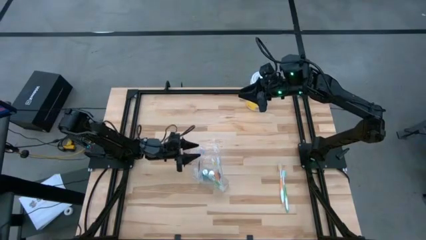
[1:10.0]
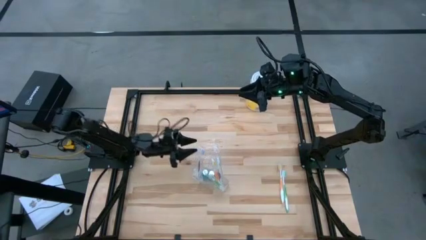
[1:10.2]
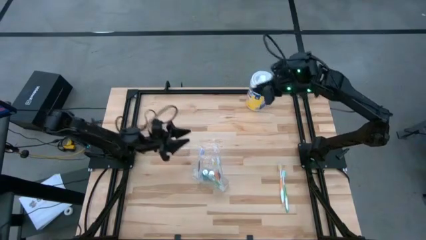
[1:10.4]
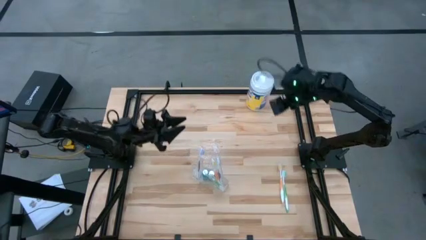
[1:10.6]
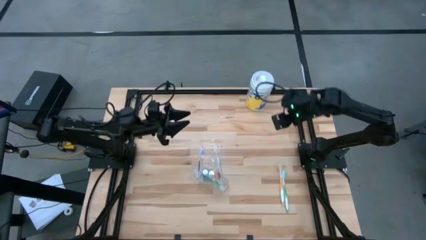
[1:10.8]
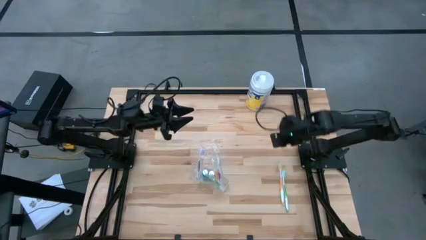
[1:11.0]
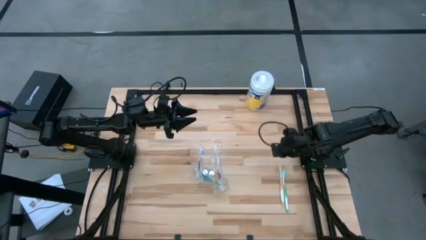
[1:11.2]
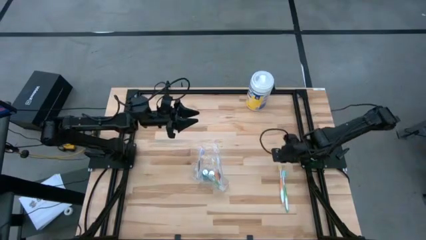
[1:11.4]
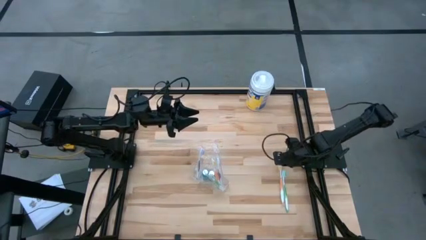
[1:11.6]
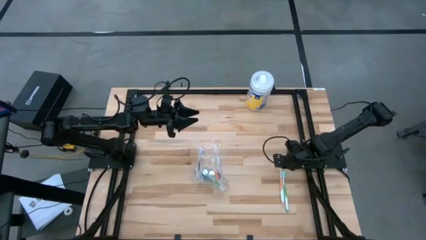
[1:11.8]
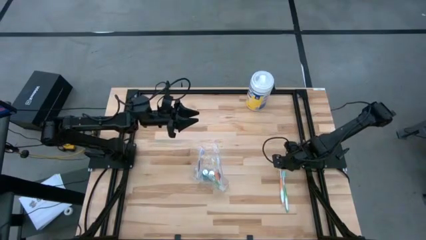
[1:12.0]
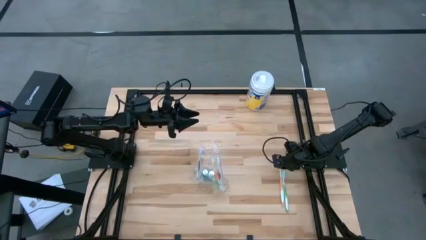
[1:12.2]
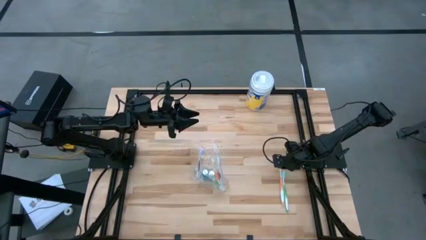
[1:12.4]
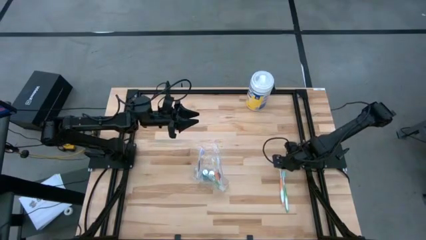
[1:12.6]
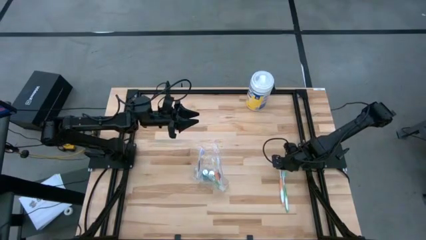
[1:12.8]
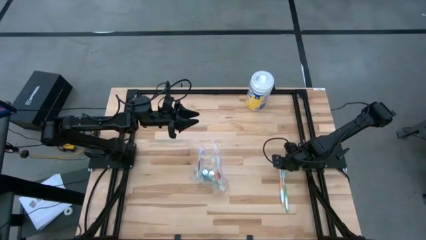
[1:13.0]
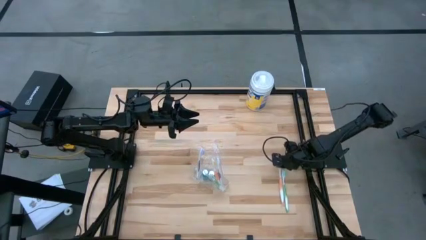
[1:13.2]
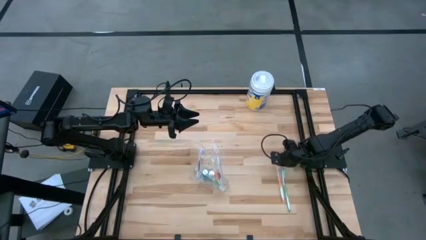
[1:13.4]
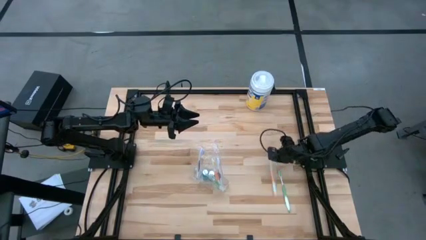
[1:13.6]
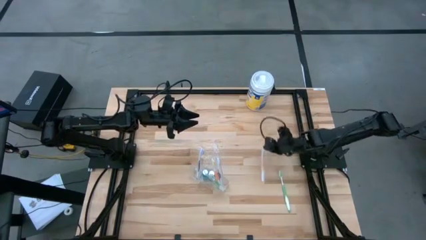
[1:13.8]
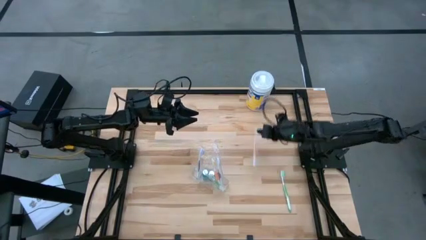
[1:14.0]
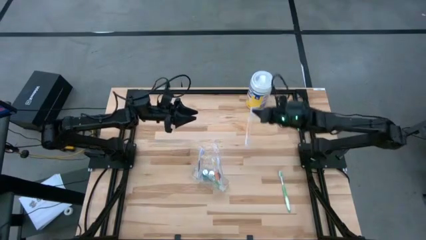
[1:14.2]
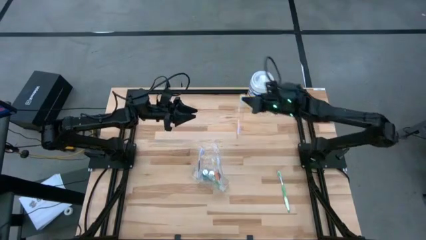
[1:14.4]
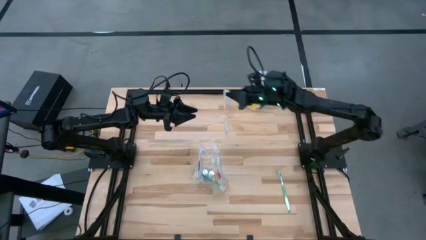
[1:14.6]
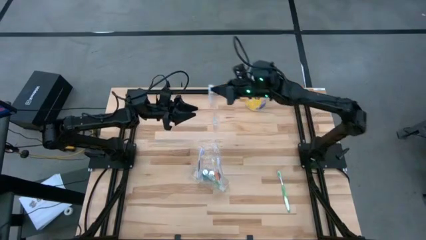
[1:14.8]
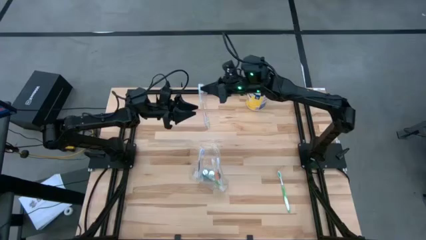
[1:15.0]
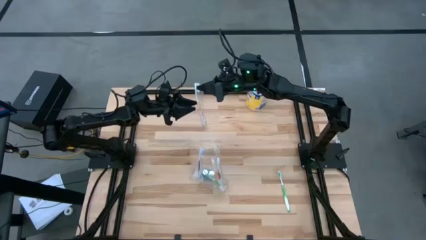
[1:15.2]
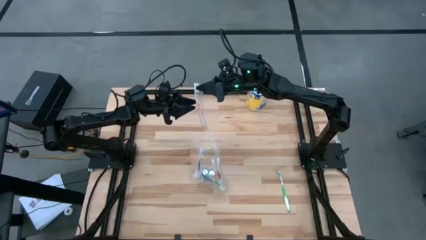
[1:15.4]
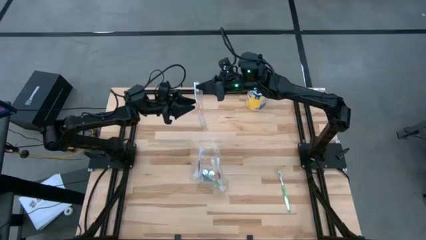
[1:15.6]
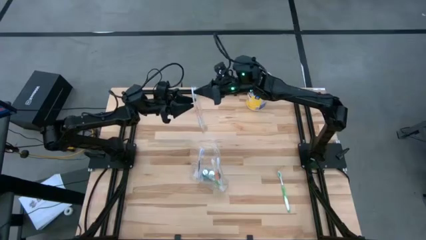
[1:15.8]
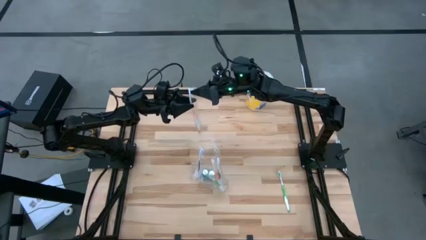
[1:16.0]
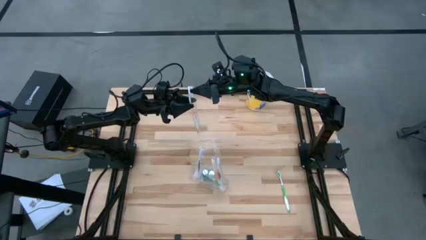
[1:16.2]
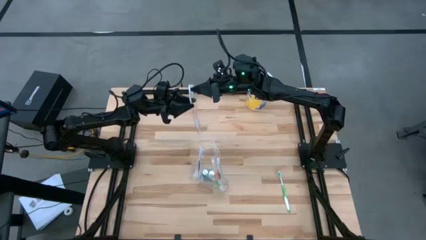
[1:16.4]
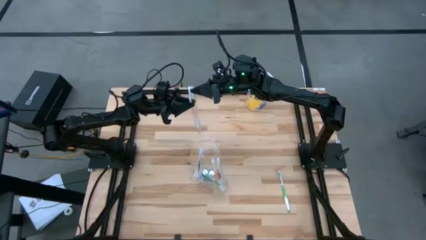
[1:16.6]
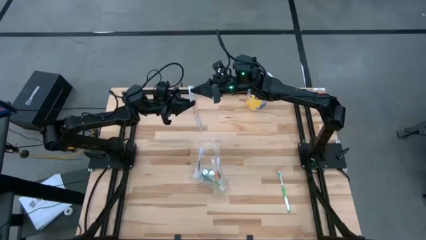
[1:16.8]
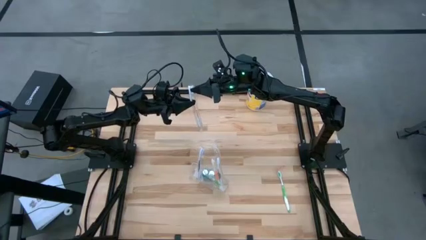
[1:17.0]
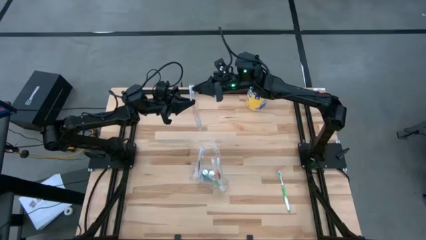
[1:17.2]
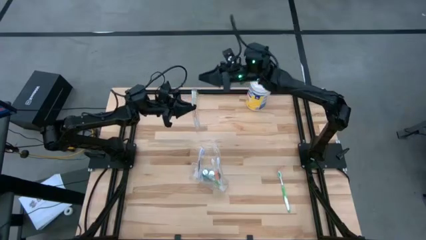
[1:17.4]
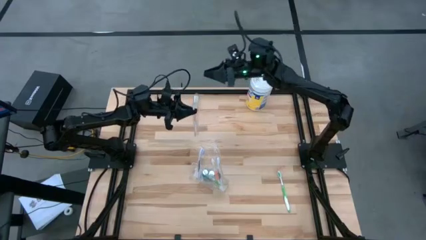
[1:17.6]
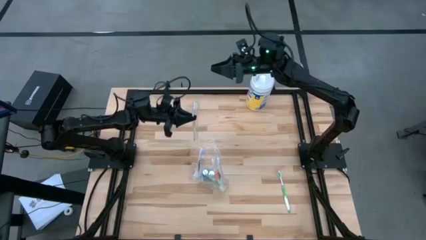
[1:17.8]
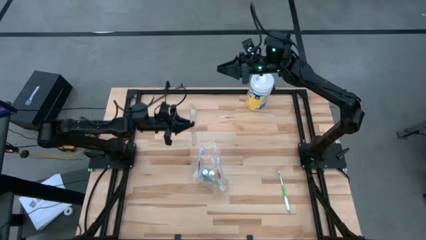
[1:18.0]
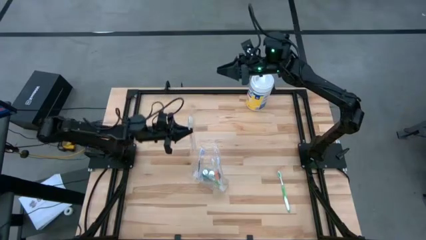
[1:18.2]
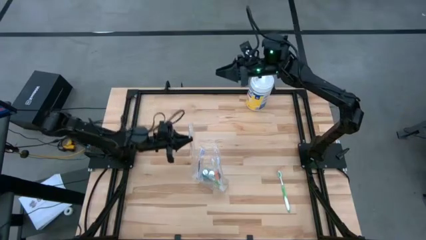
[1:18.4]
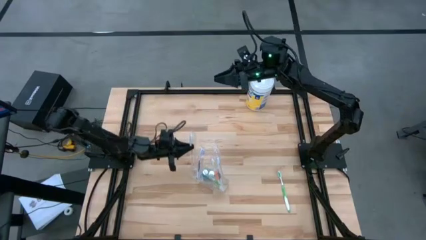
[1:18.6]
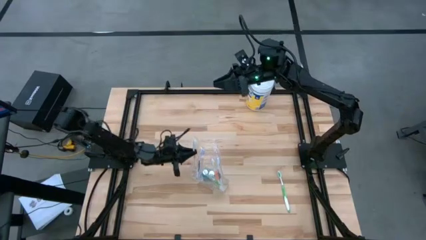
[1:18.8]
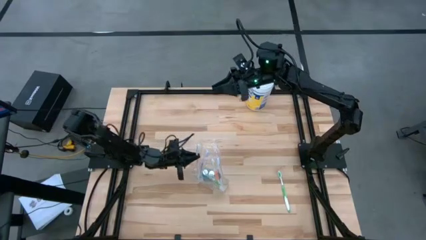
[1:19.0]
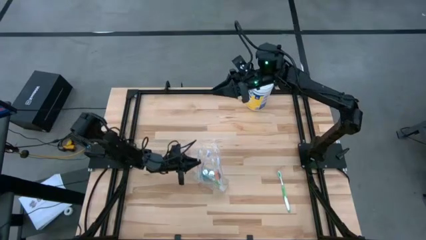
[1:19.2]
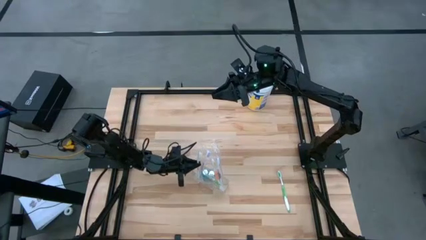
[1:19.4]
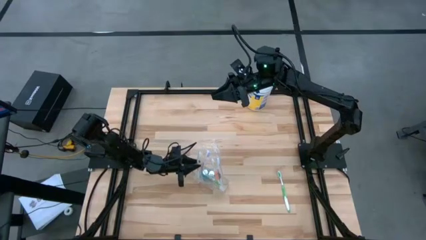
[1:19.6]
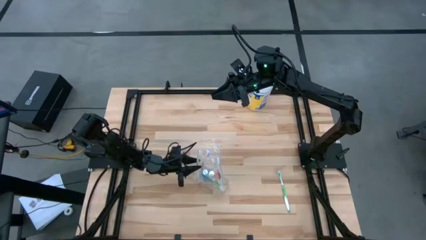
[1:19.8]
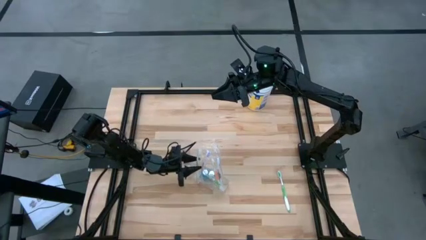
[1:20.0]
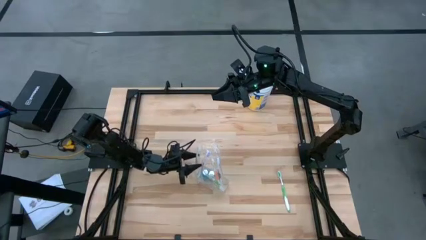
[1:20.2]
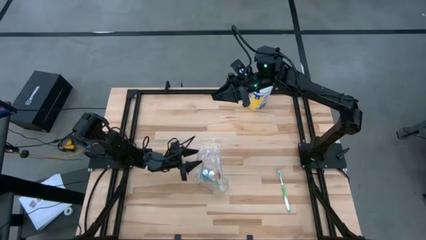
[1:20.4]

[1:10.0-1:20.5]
Task: Pick & Place toothbrushing station
Put the orange toothbrush into the transparent organizer
